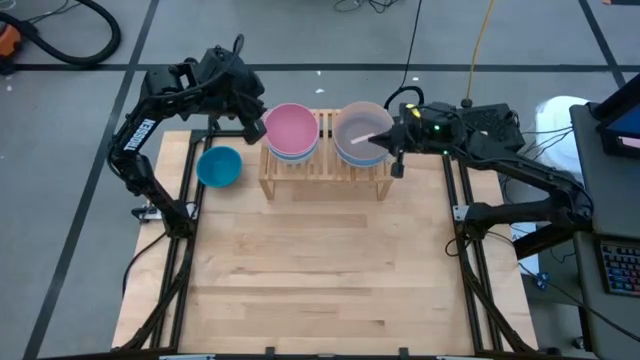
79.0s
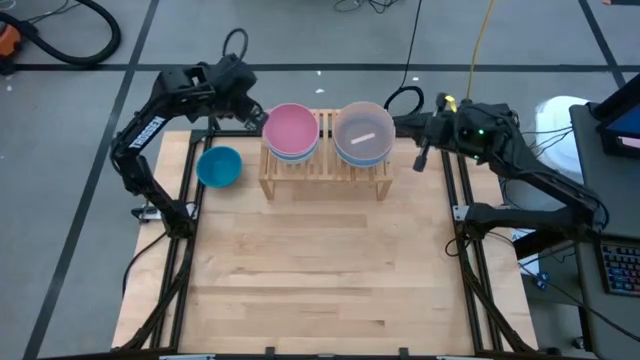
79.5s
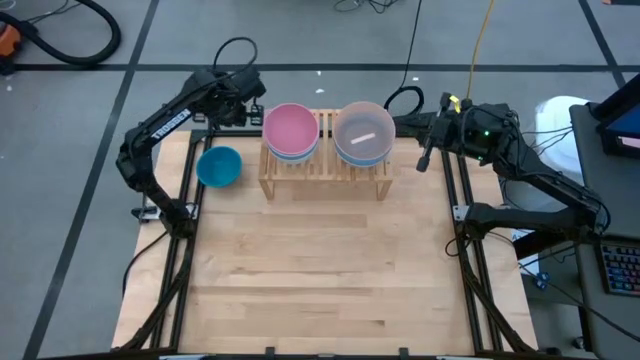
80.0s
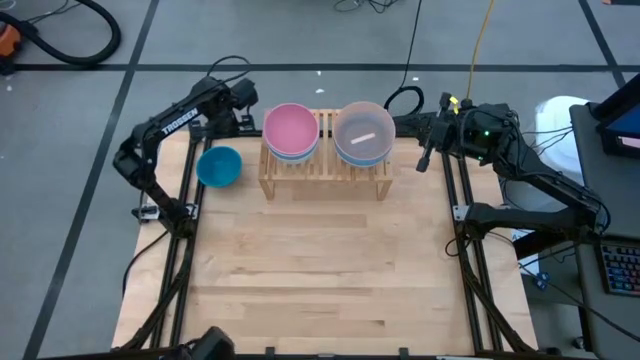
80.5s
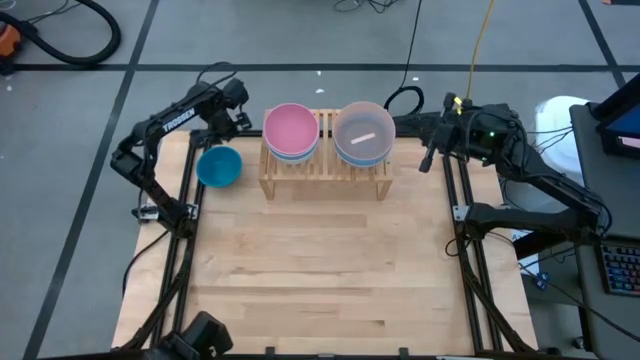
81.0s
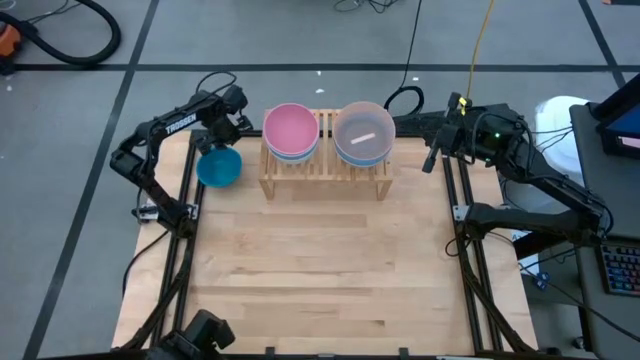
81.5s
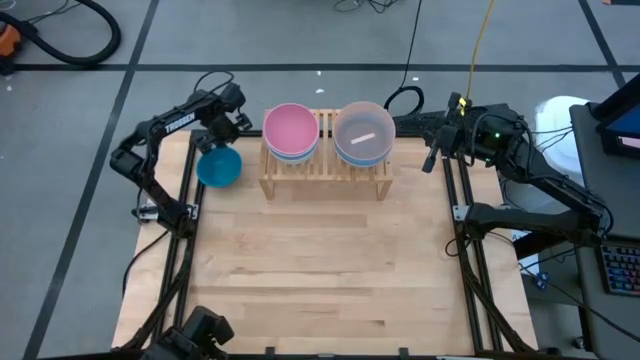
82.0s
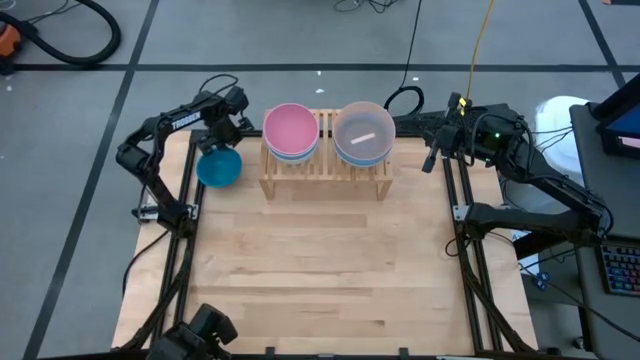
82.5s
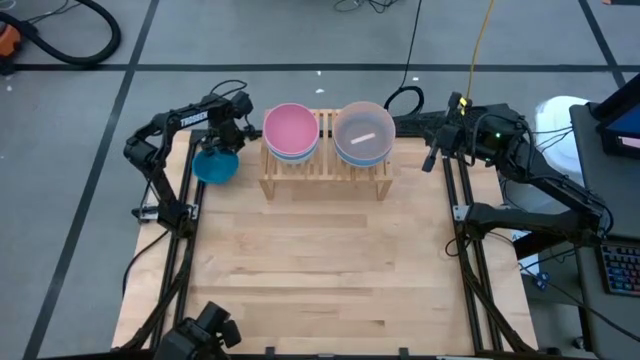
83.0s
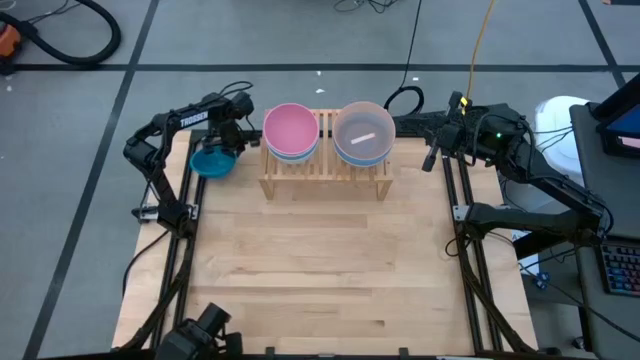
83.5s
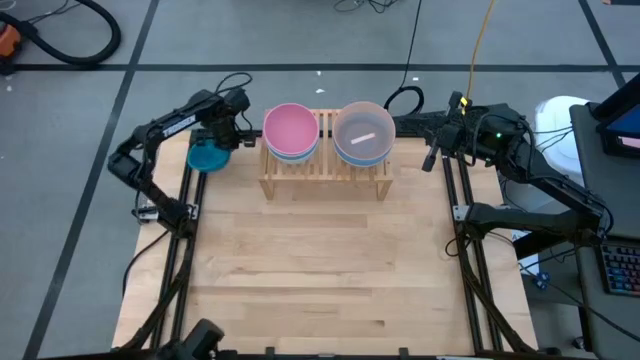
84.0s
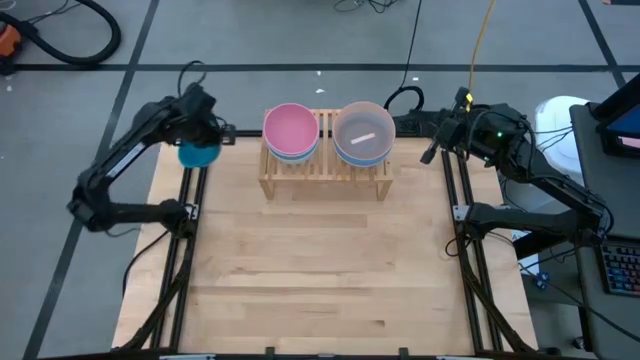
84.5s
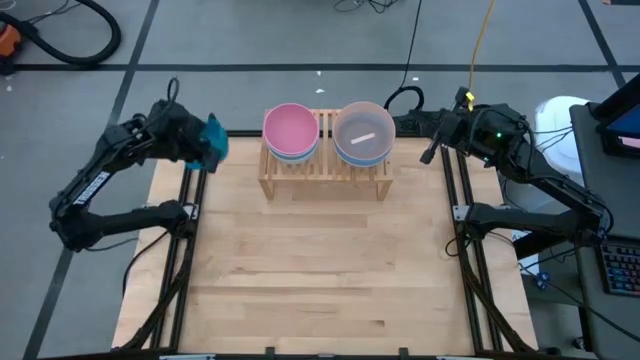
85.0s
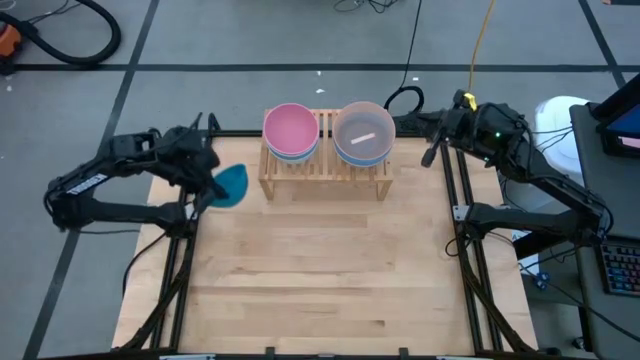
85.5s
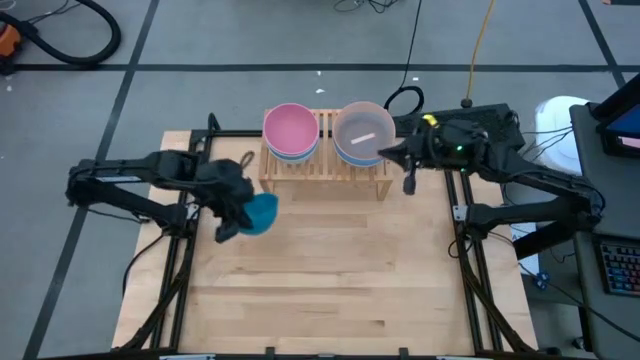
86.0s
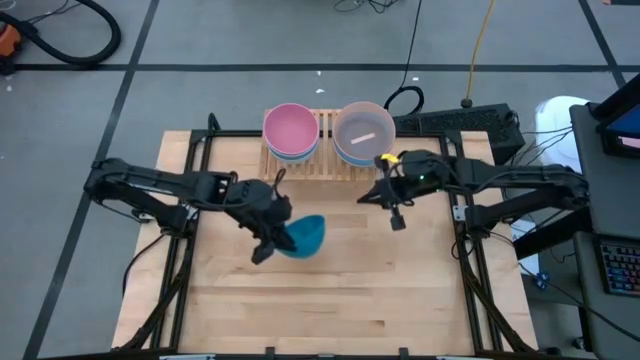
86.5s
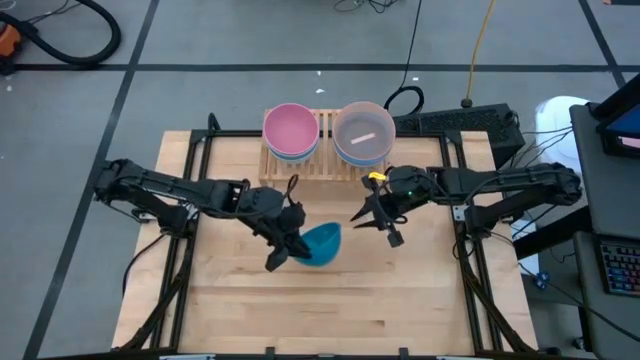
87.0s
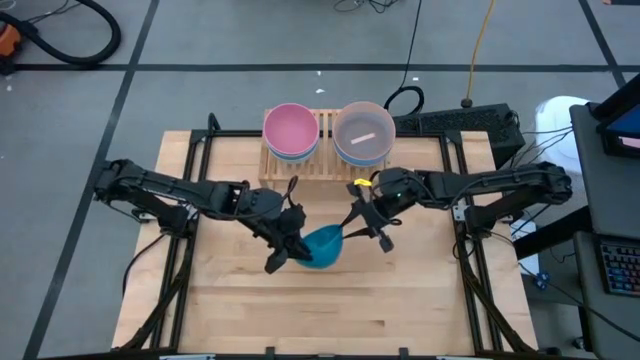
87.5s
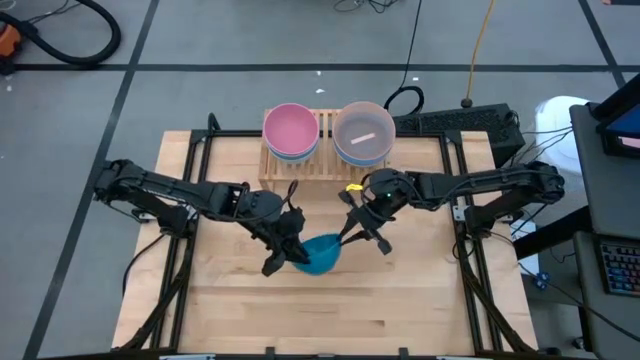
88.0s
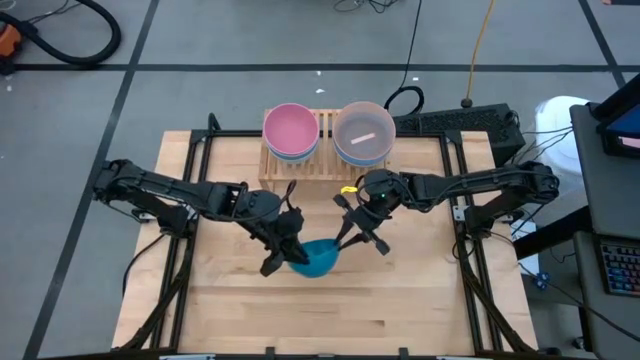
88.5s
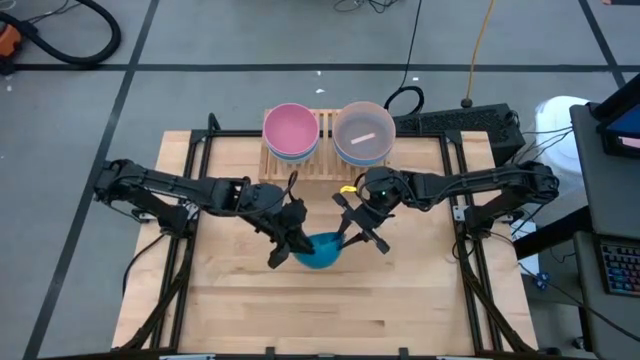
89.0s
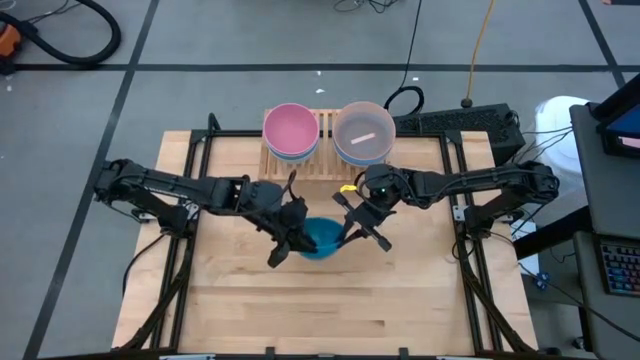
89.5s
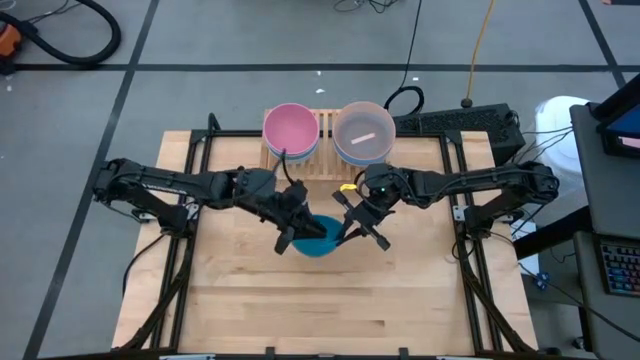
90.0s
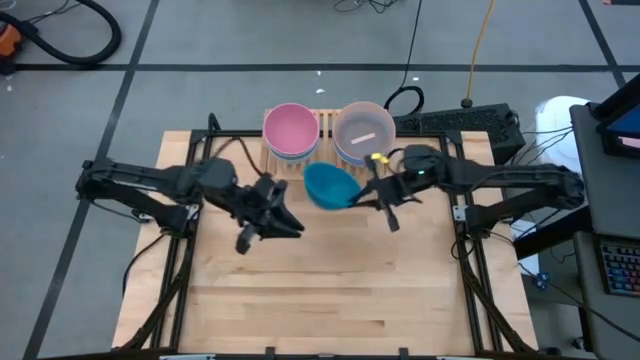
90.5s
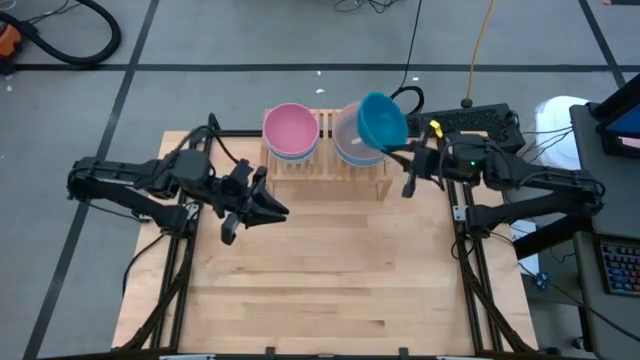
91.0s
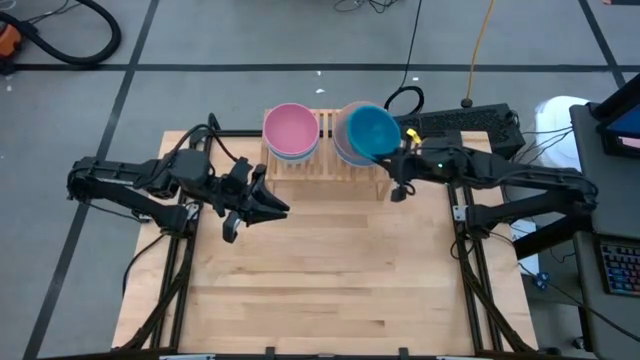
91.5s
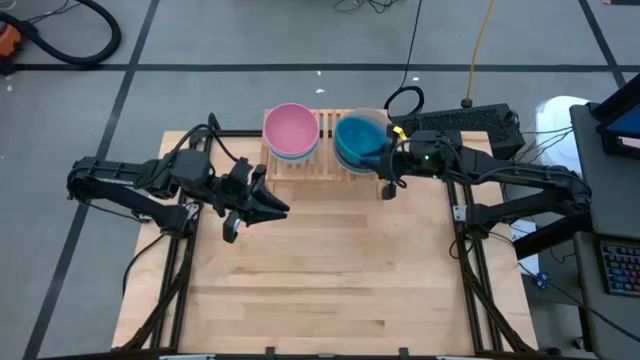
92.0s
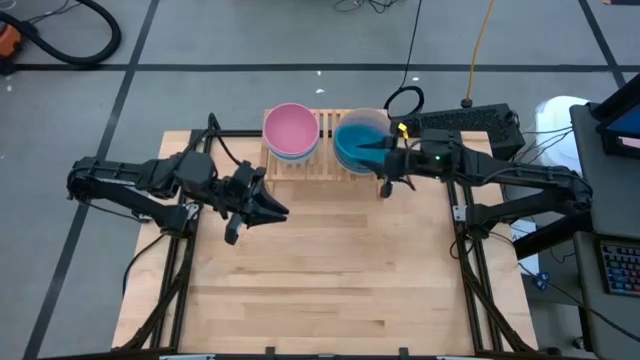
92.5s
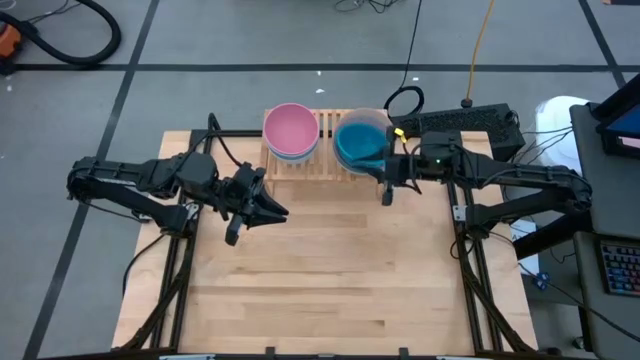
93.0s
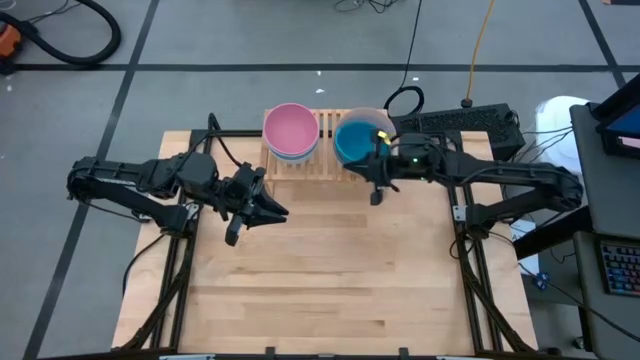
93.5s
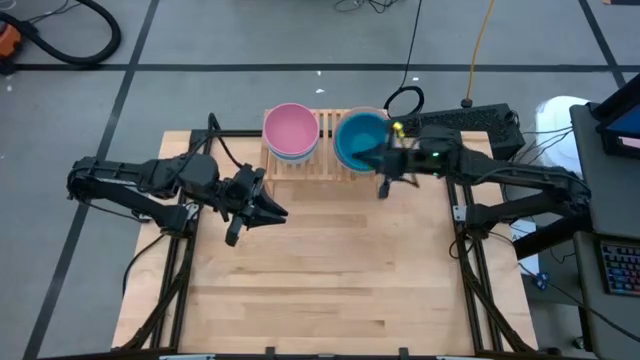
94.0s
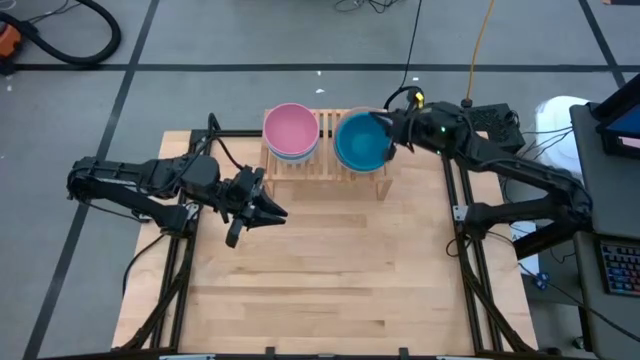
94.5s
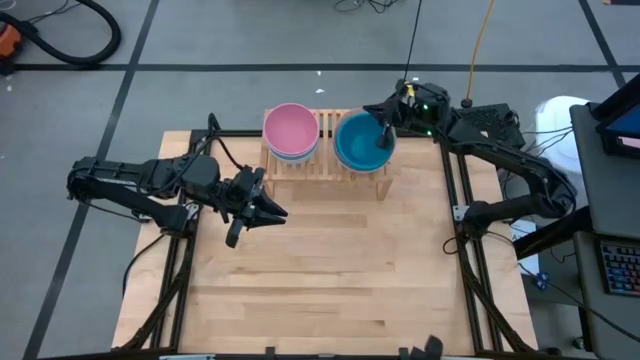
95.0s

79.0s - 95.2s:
Task: Place and stack bowls onto a shelf
Stack the small blue bowl on top of the large orange bowl on the shelf

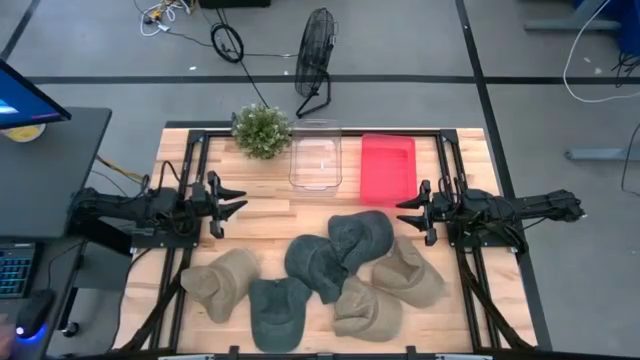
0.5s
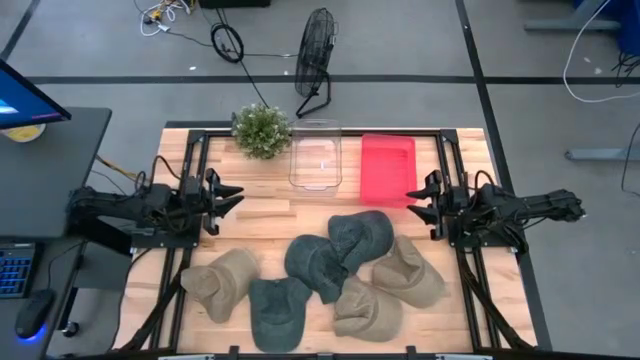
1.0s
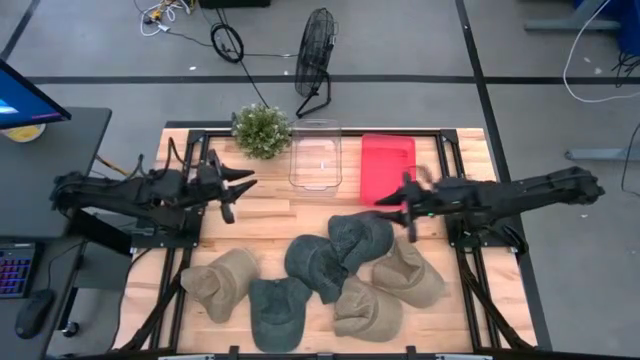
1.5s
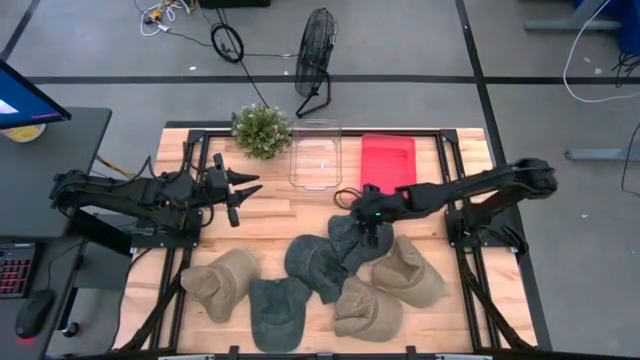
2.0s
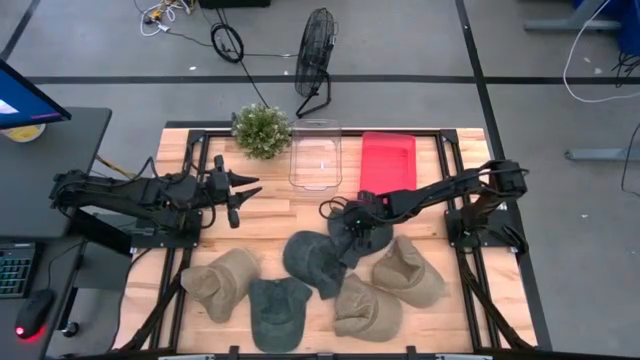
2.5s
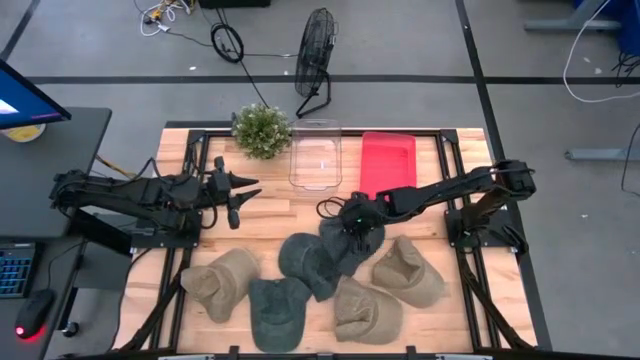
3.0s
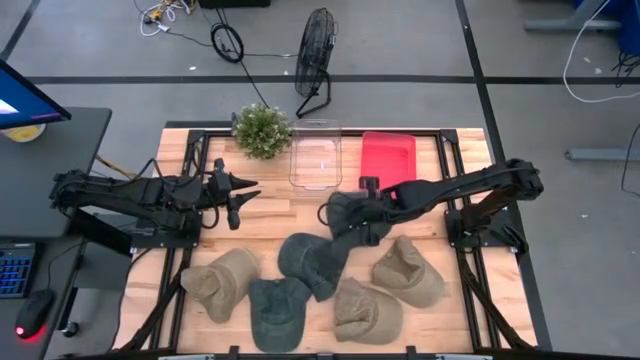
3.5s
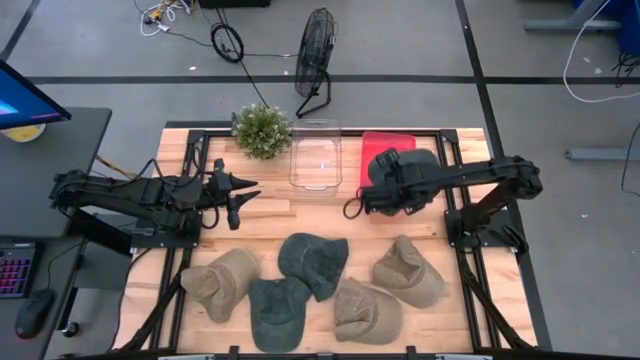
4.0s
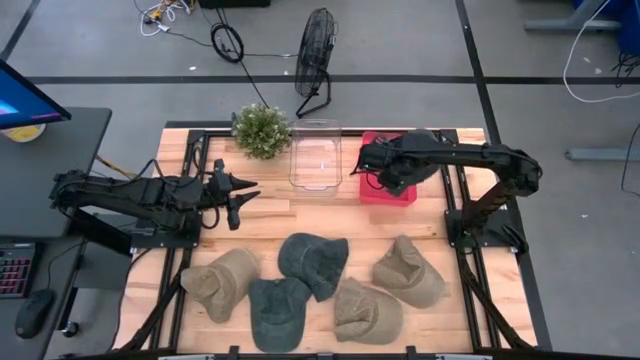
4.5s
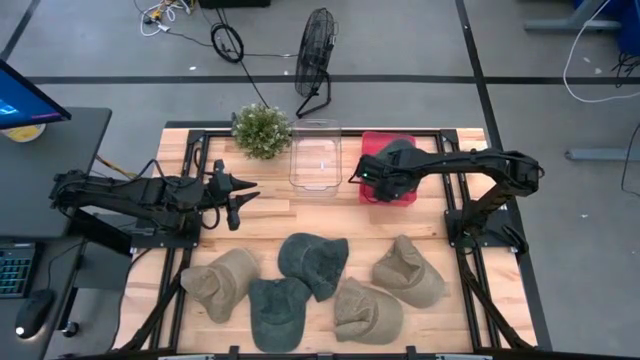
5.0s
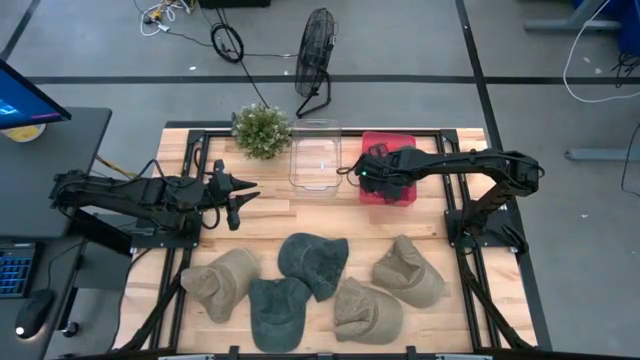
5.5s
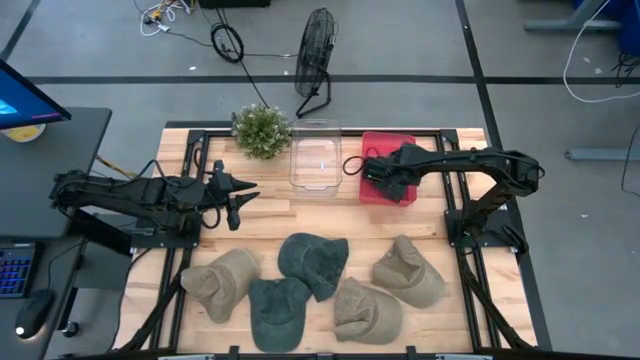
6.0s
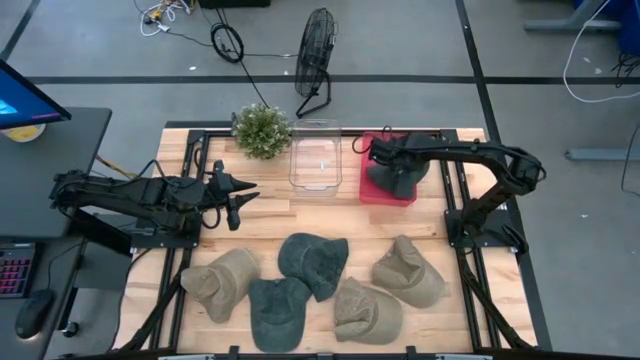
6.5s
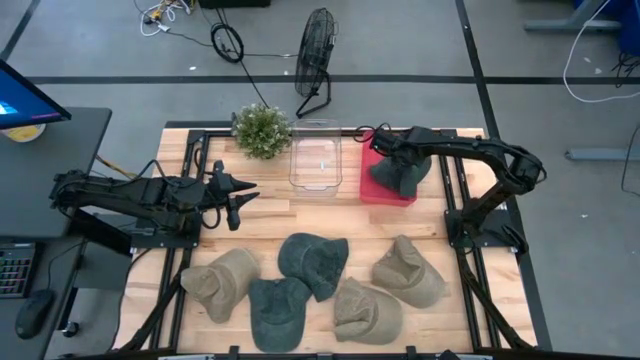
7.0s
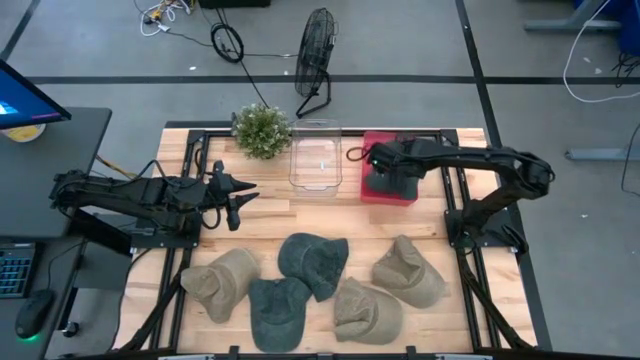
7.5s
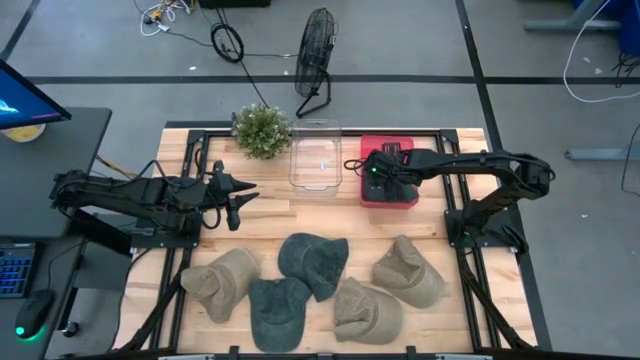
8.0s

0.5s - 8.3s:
Task: Pick & Place hat
Put the top gray cap into the red bin
